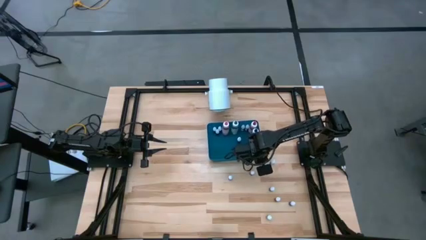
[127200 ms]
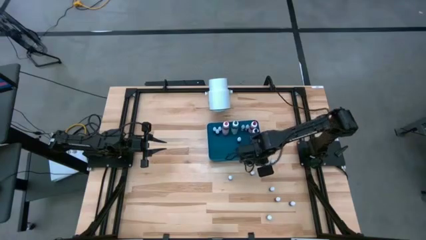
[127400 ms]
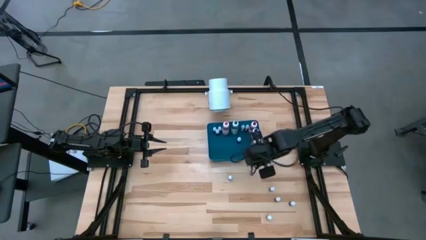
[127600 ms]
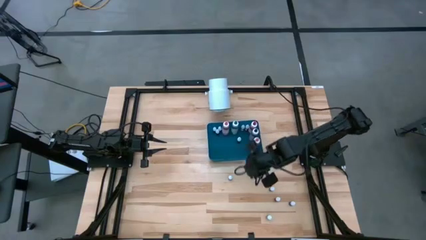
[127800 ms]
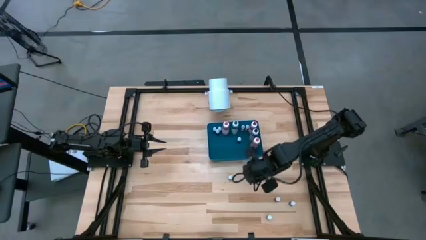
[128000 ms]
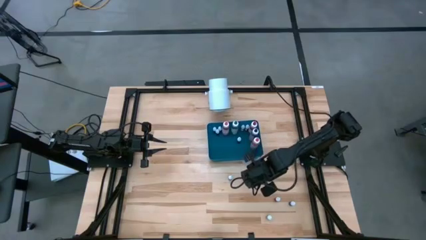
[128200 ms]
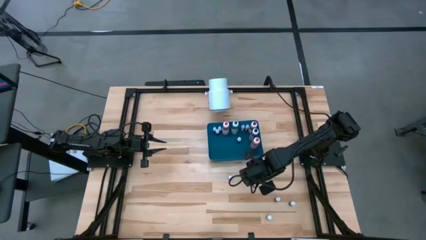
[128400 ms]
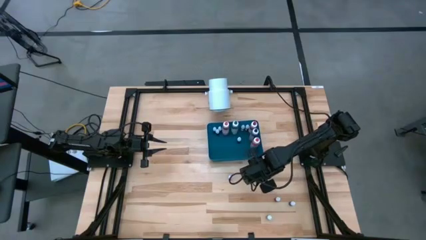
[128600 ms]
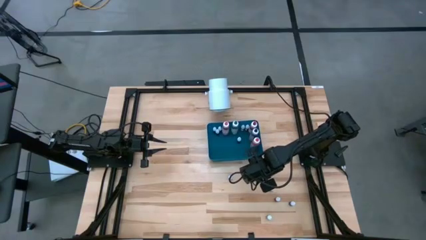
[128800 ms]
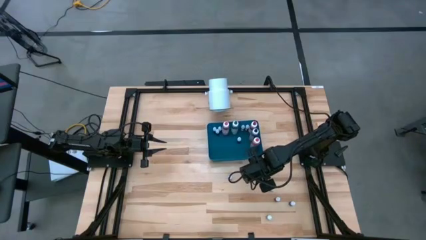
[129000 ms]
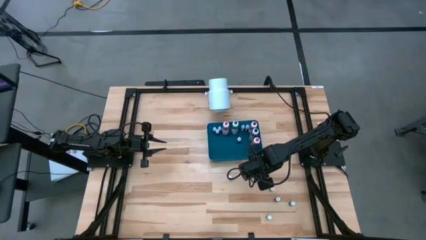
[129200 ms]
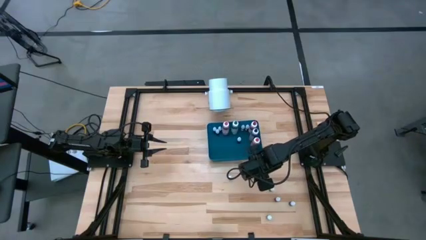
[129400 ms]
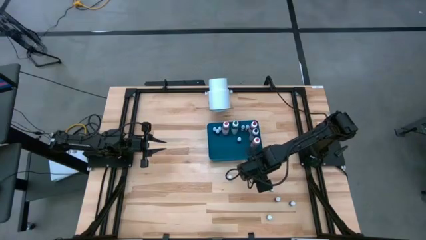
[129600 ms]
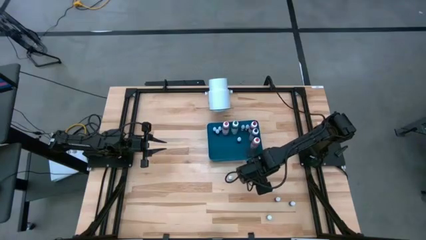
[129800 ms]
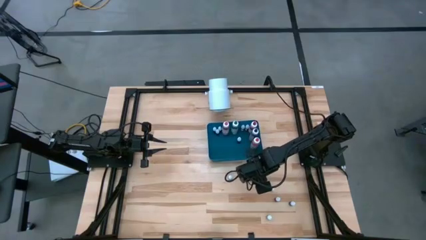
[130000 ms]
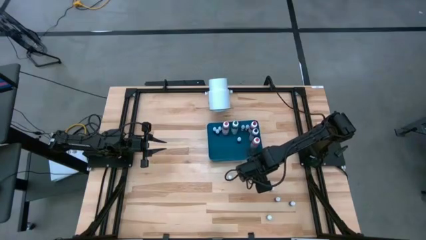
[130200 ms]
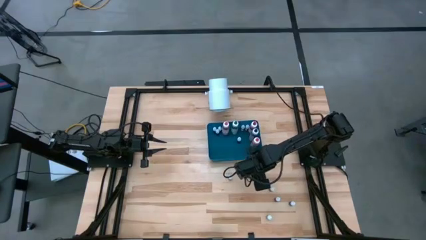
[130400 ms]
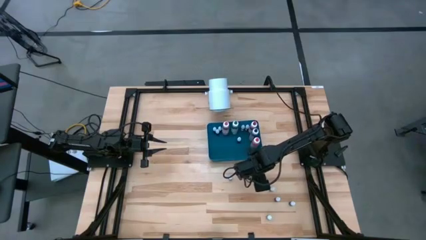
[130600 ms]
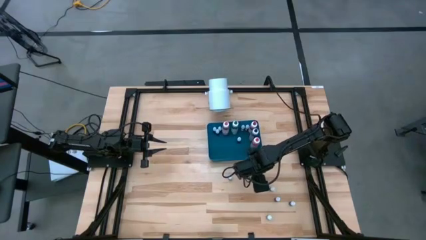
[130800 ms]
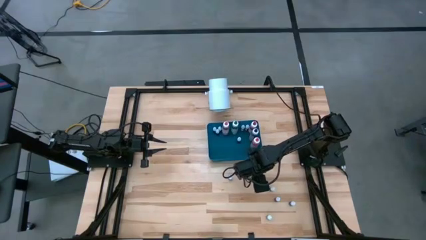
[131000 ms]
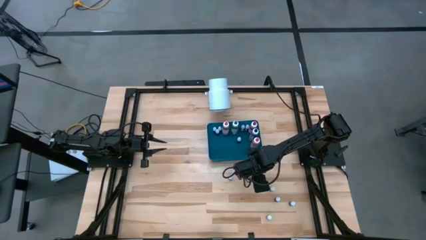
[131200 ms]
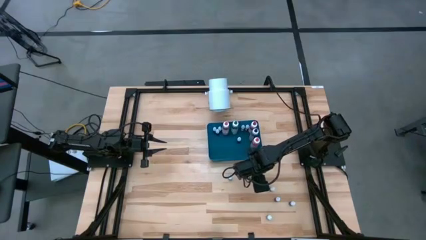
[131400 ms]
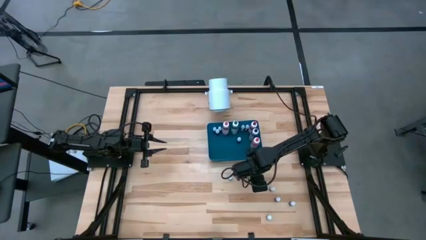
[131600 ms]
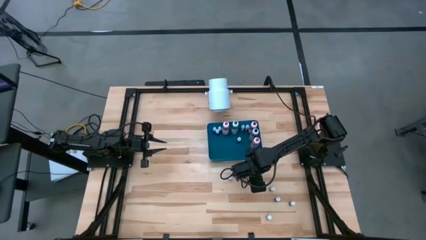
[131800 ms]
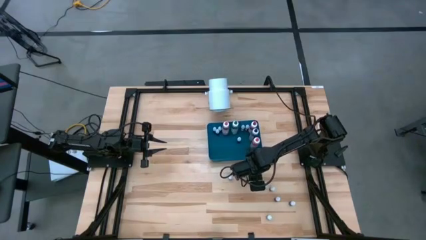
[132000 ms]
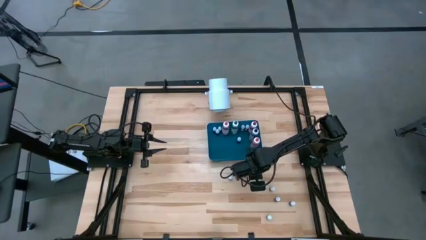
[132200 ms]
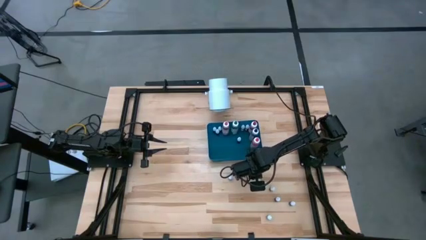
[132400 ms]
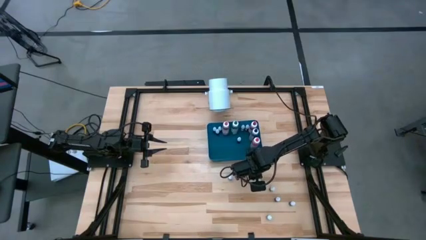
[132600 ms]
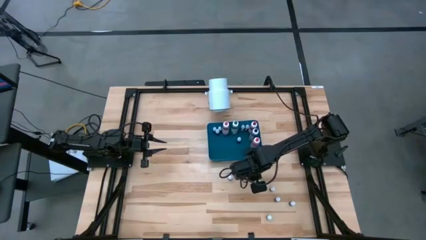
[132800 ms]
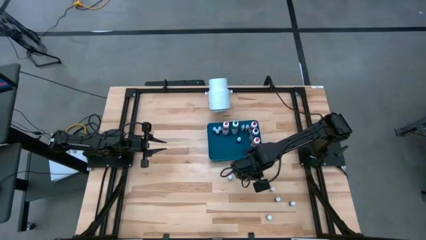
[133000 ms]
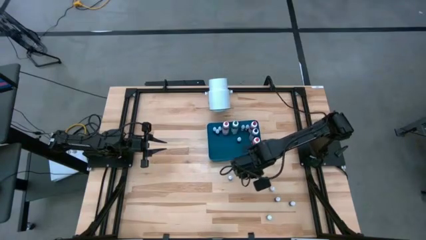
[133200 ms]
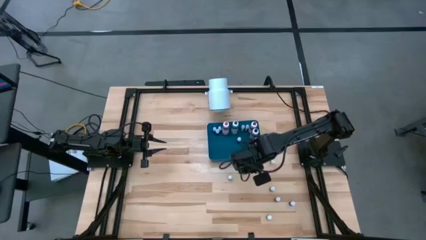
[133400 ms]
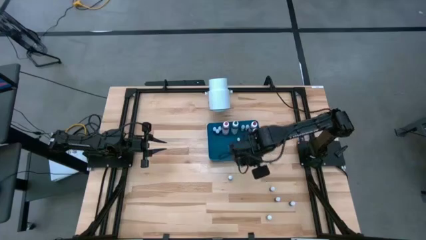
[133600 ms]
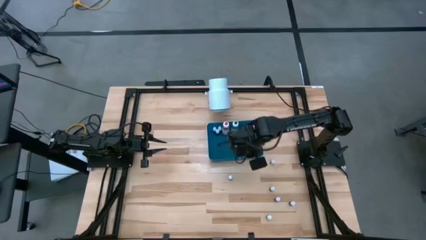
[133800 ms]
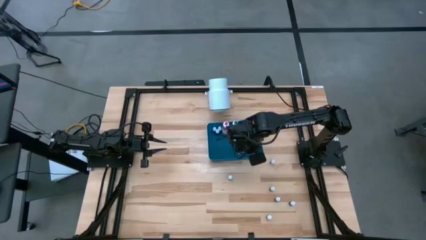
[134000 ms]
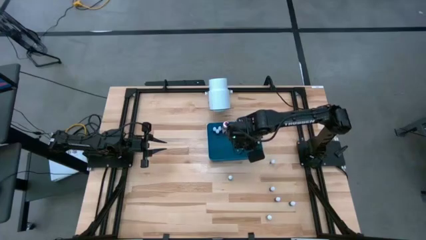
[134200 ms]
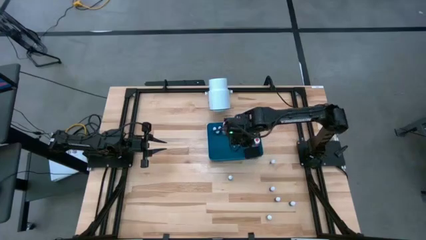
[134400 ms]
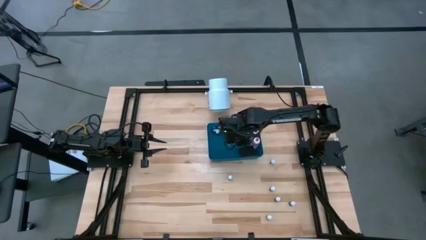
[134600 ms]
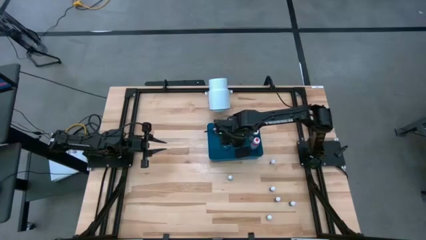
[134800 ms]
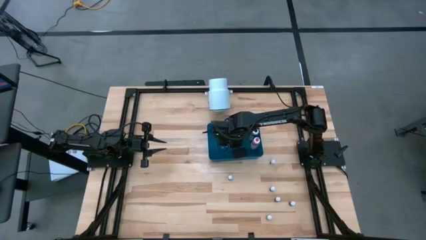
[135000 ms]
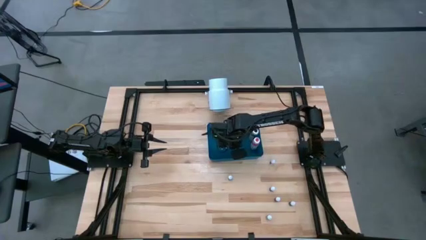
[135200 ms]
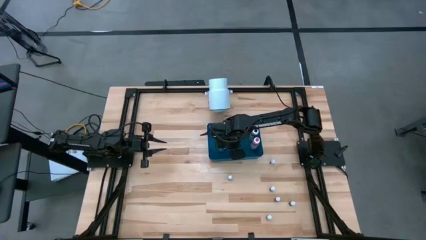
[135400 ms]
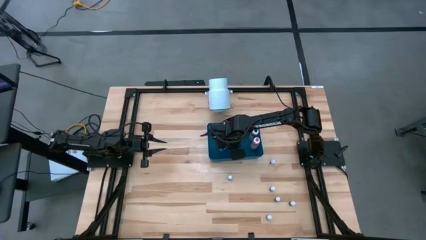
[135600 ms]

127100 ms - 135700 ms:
Task: Pick & Place food coloring
Put the small black food coloring bottle into the blue bin

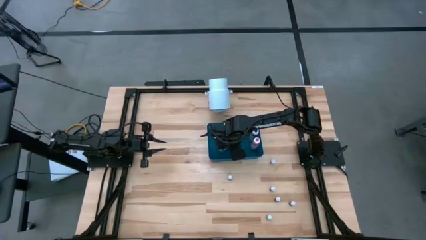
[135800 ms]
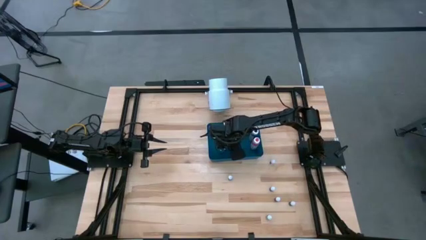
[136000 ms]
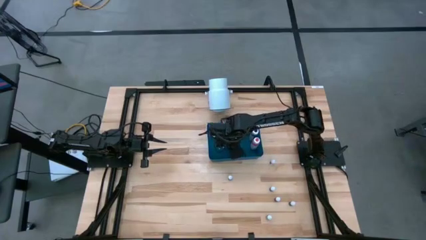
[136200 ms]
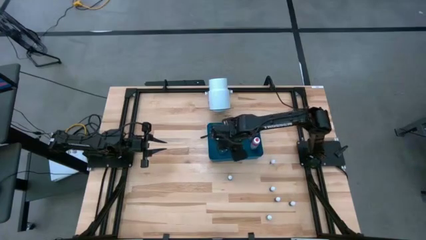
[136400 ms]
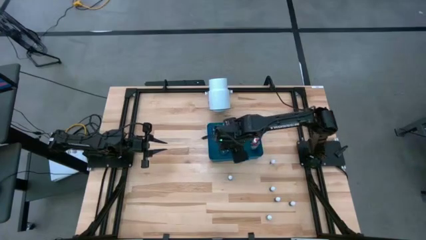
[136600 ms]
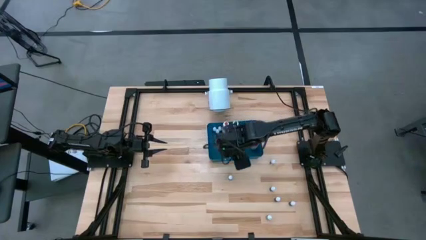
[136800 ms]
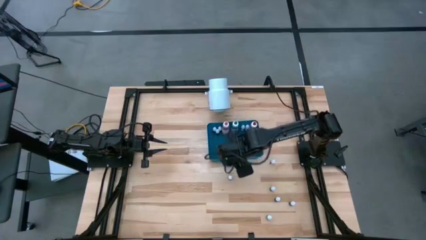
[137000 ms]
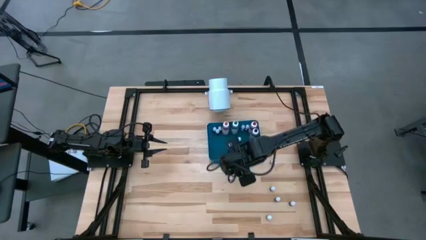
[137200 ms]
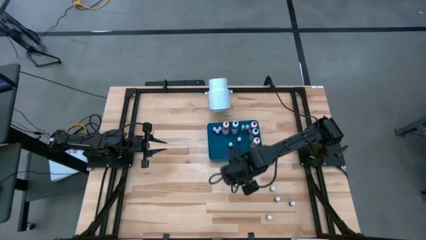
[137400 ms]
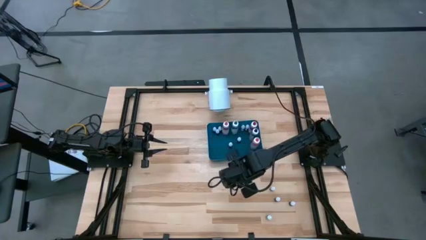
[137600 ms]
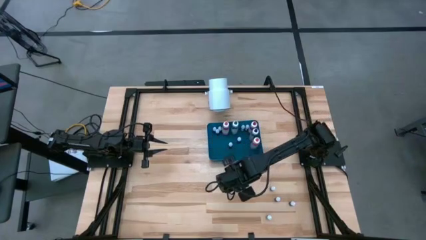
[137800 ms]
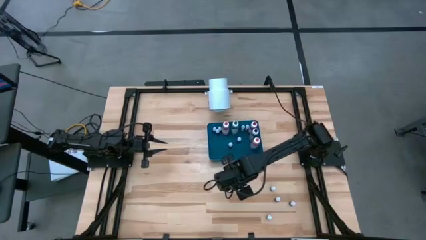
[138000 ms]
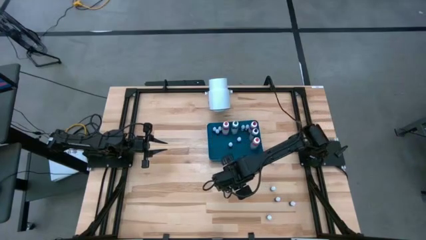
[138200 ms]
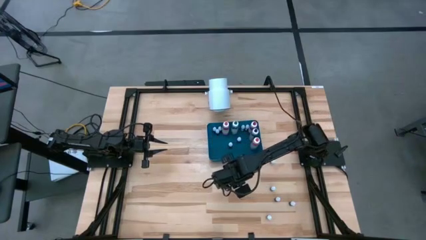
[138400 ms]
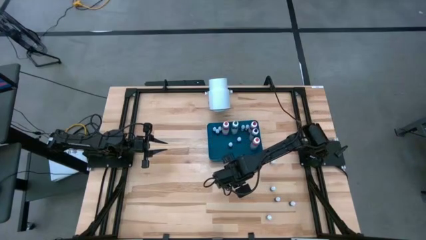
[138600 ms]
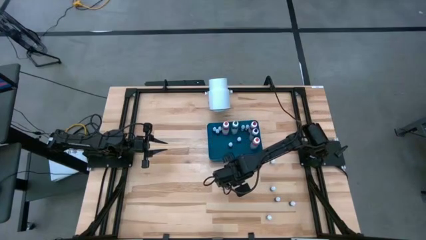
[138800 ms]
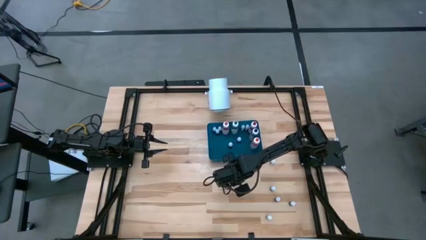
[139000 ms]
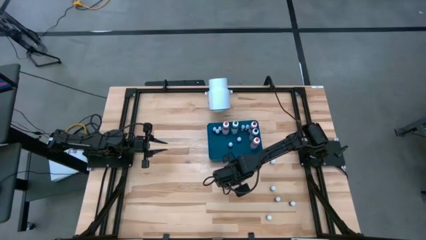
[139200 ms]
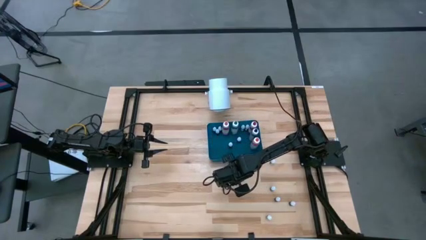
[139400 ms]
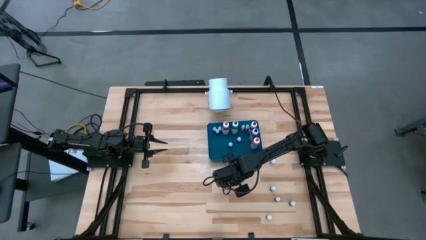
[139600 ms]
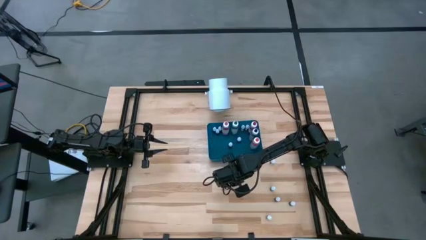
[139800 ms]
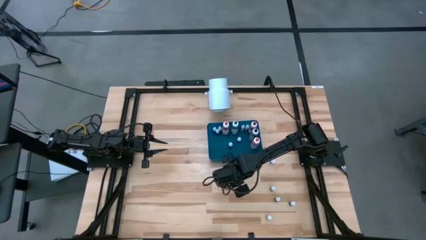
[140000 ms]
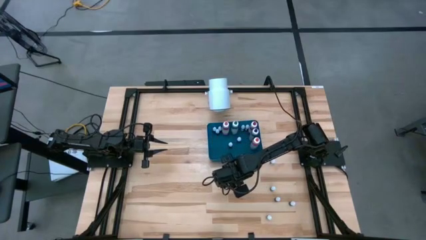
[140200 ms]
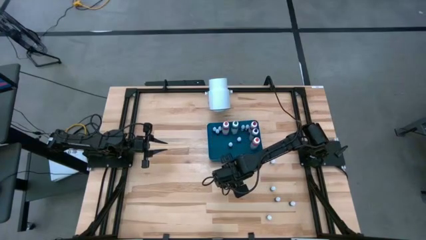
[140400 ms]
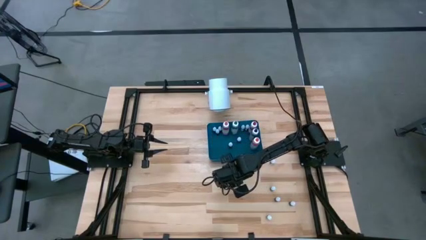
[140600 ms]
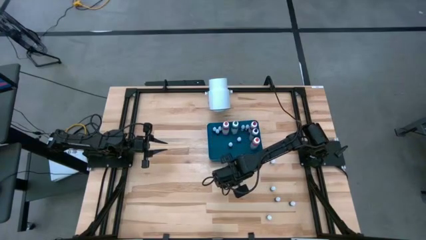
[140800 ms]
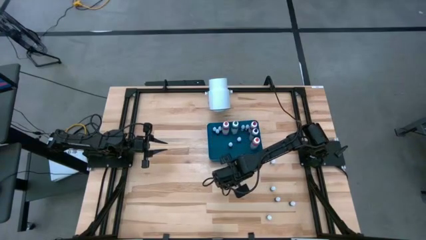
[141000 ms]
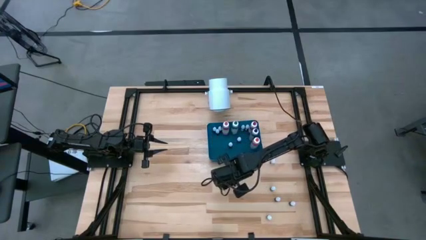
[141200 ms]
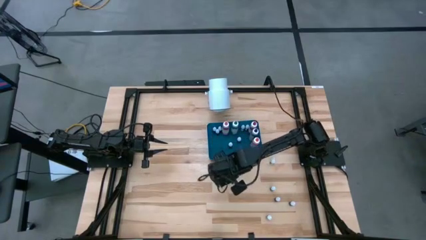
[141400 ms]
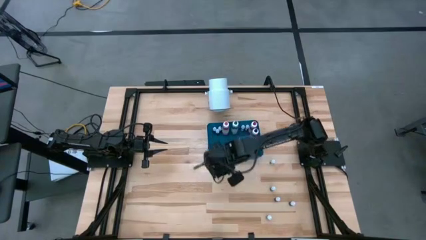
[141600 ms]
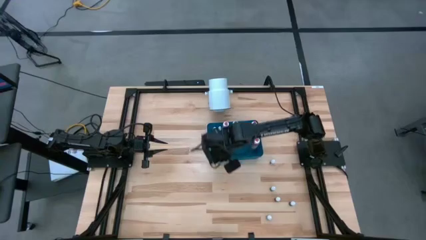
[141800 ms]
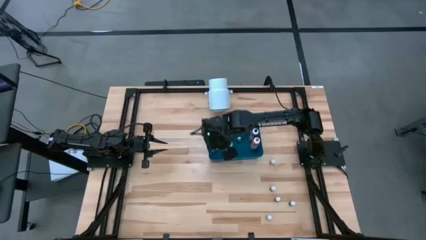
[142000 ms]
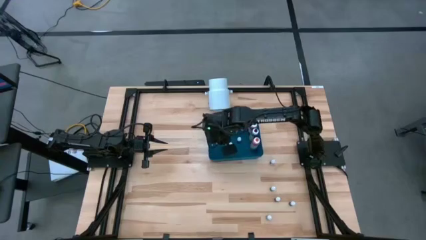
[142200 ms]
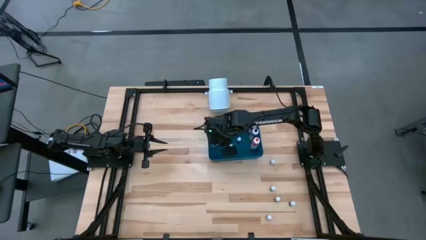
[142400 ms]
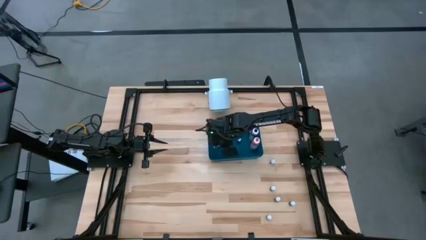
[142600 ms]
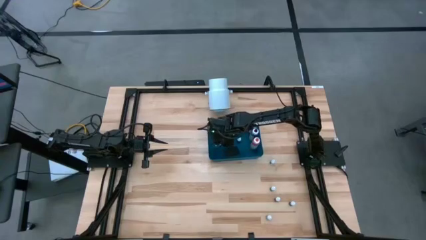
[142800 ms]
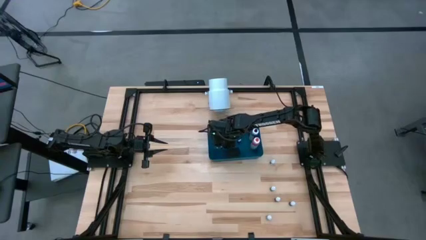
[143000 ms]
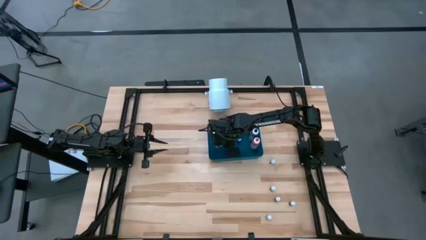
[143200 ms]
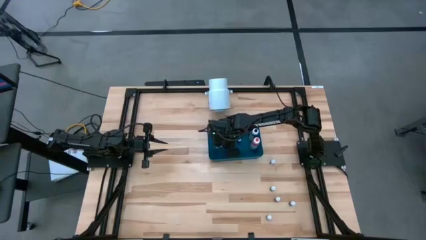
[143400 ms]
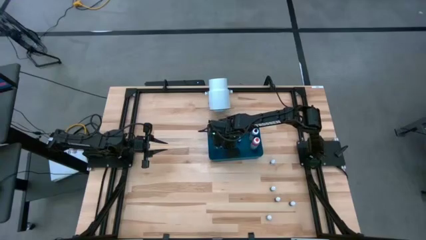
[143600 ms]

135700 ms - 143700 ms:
Put the small blue food coloring bottle into the blue bin
